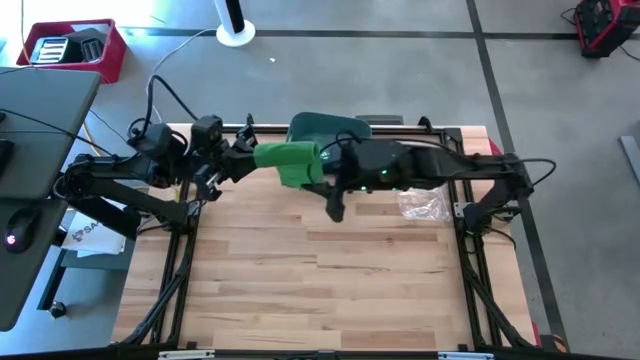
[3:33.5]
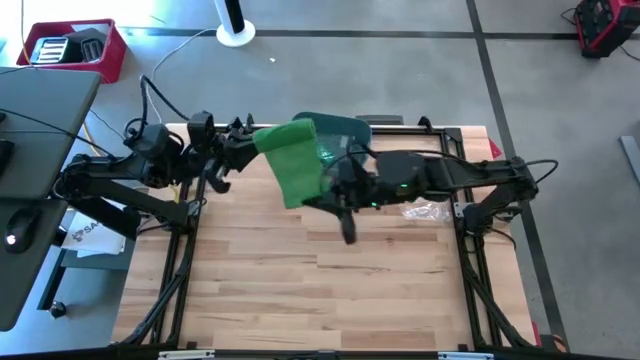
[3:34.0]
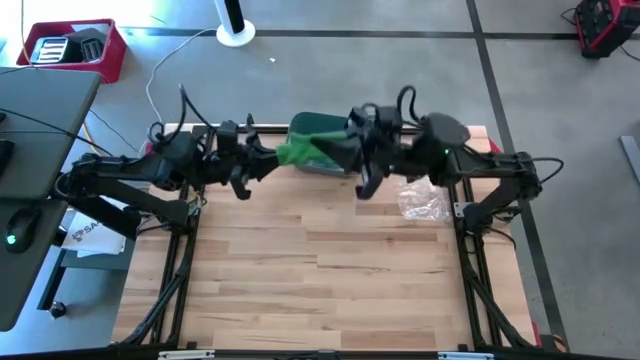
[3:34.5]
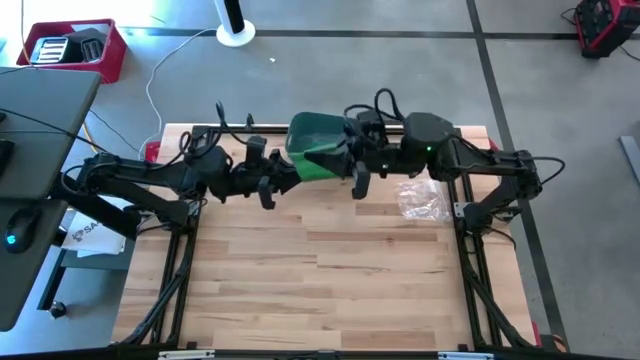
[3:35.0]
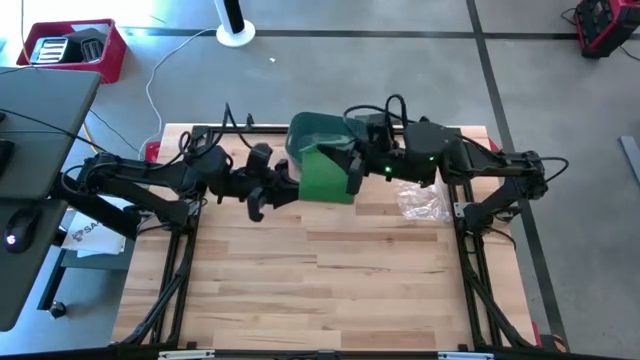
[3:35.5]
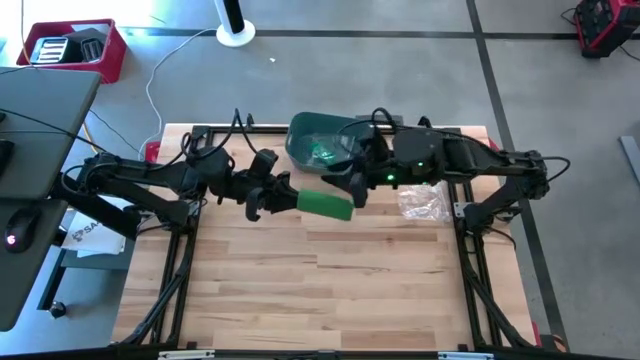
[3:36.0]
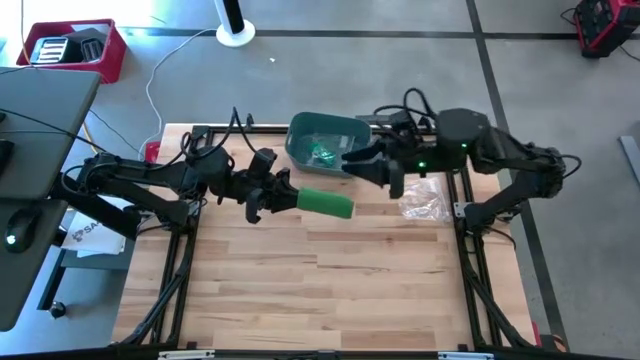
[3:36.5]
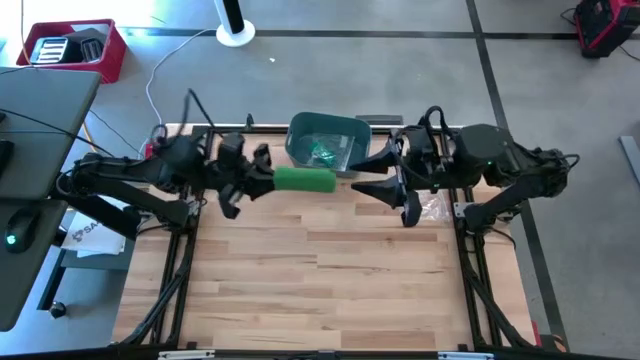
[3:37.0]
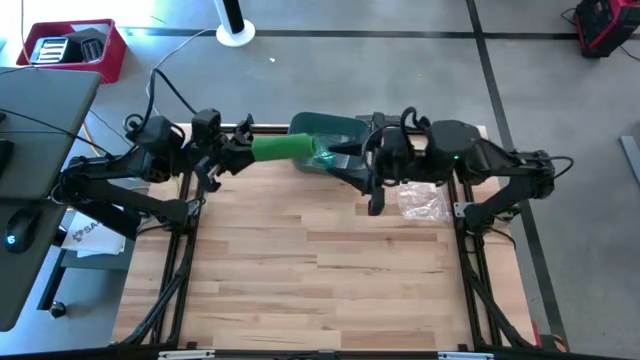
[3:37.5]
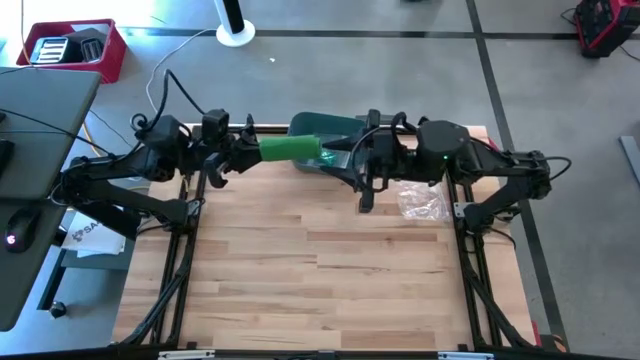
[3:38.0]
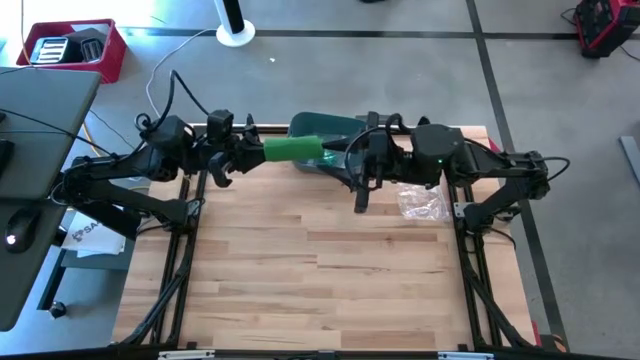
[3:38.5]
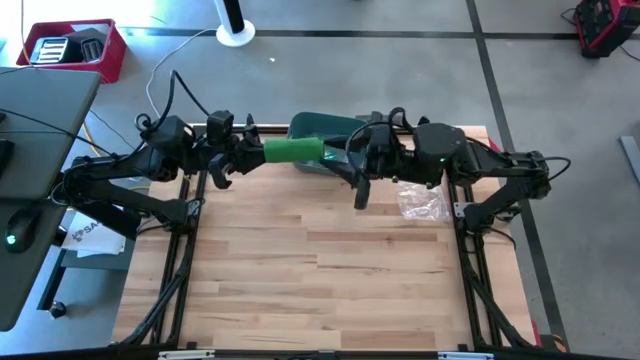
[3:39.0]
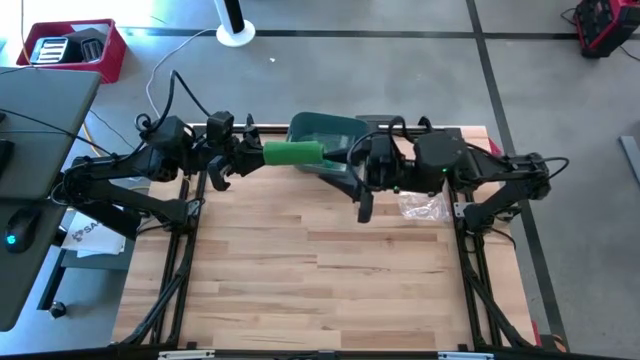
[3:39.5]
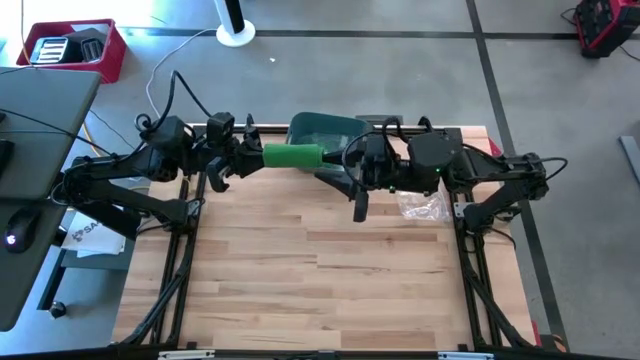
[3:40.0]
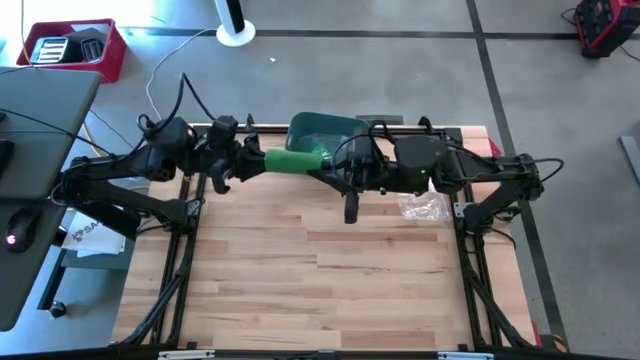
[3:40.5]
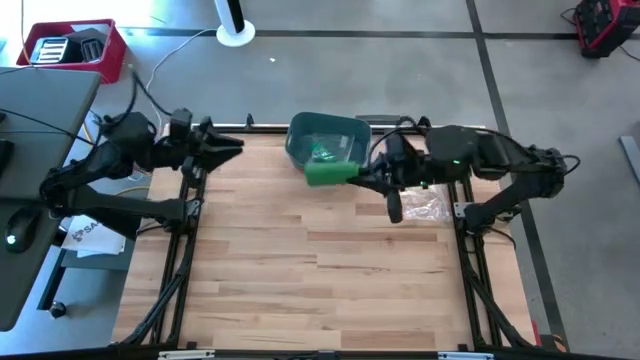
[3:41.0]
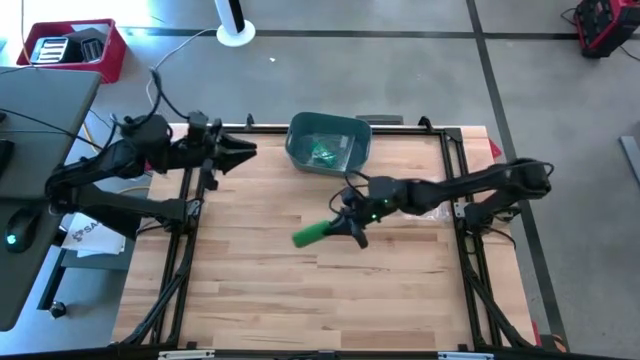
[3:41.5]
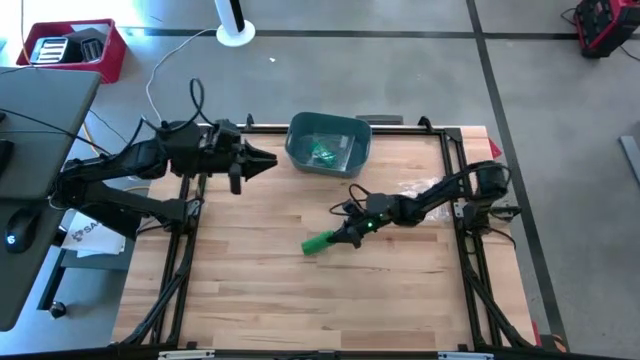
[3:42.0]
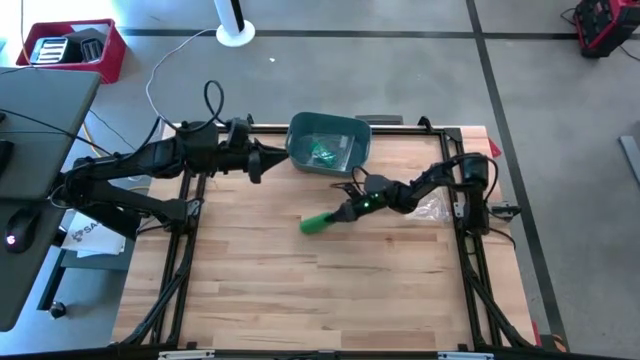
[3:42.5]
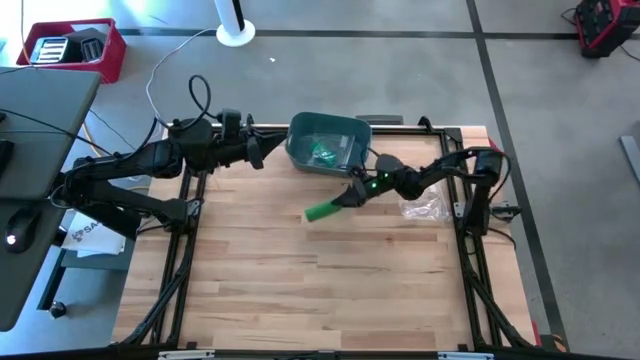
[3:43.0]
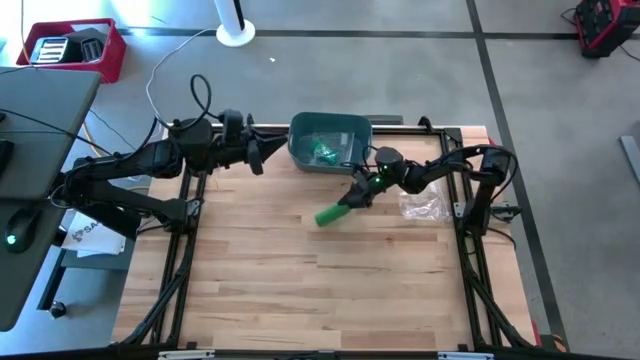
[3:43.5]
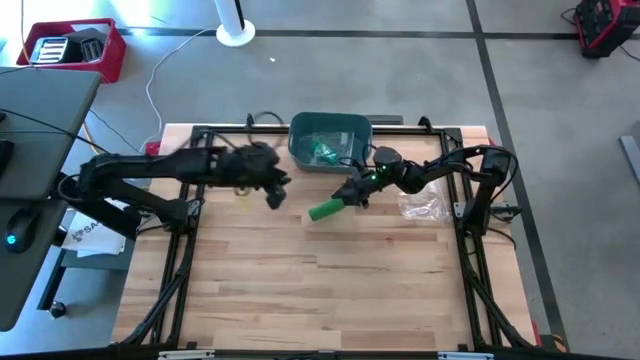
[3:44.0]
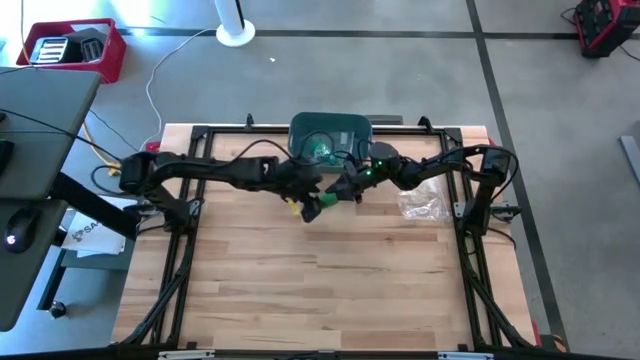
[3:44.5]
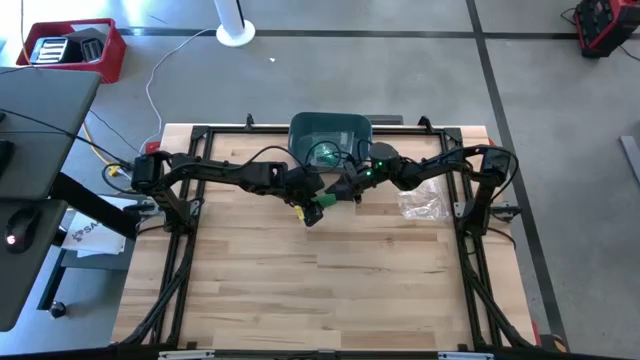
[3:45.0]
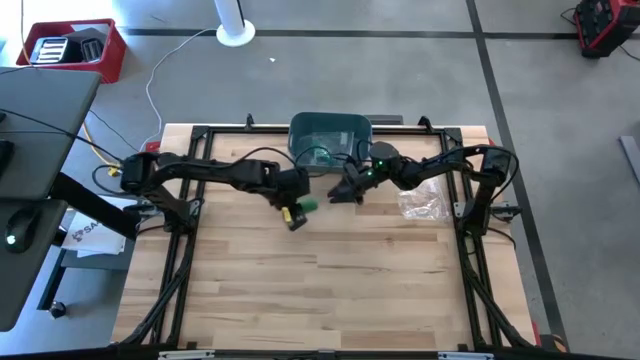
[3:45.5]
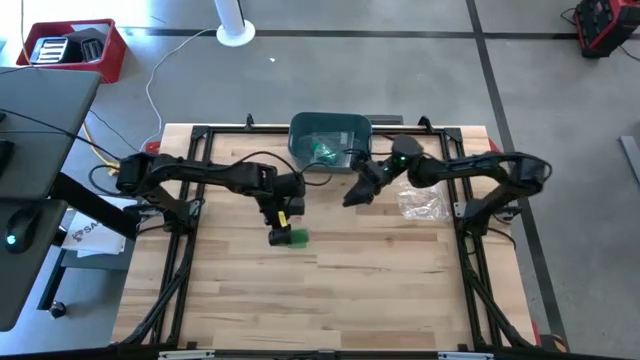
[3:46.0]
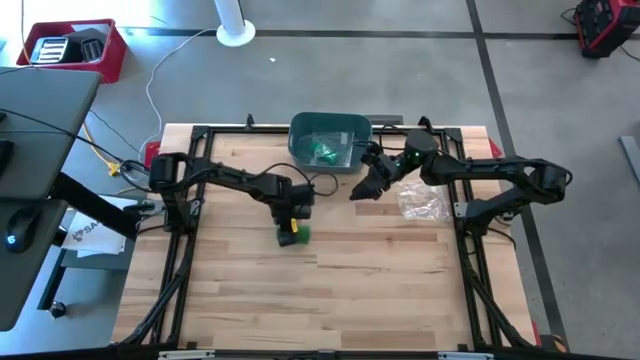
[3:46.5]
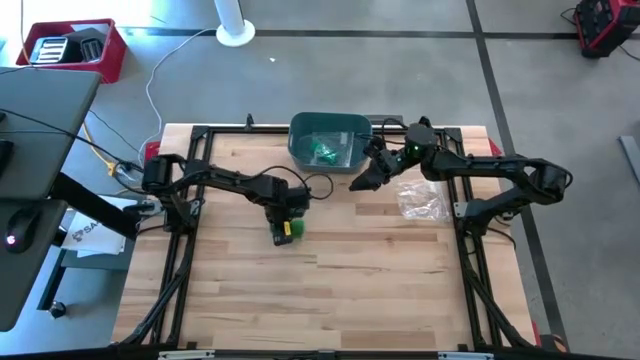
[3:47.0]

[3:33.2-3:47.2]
Task: Roll bandage
Roll the green bandage

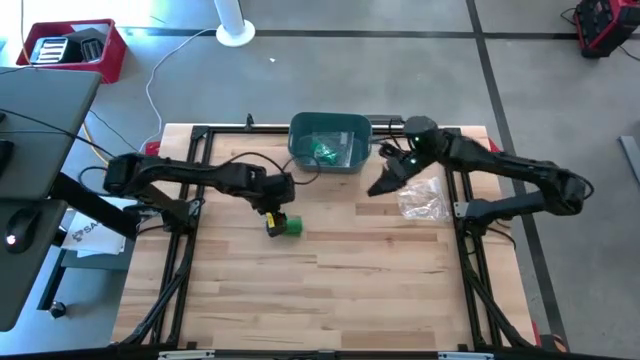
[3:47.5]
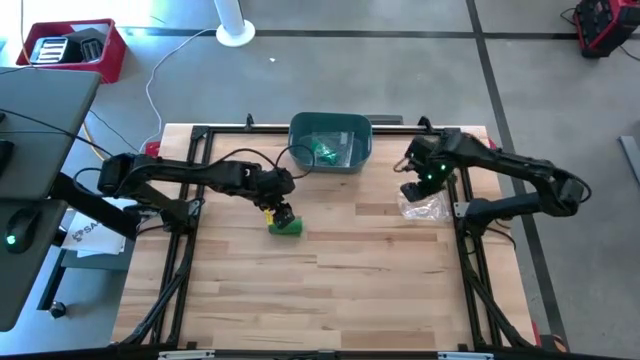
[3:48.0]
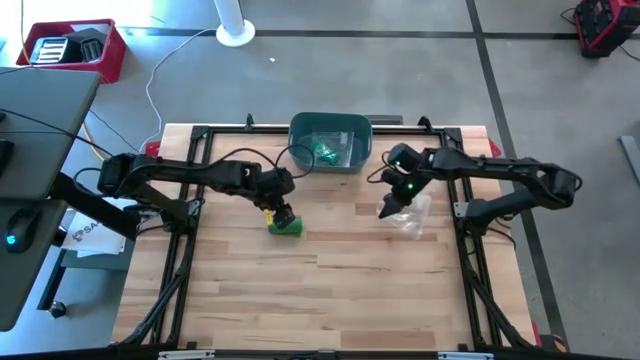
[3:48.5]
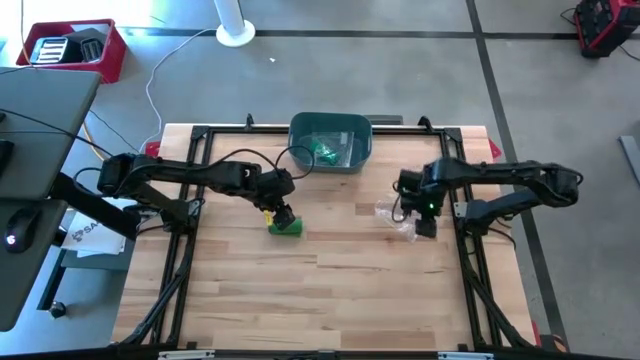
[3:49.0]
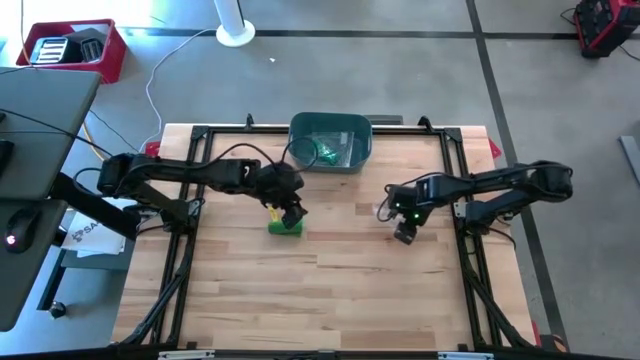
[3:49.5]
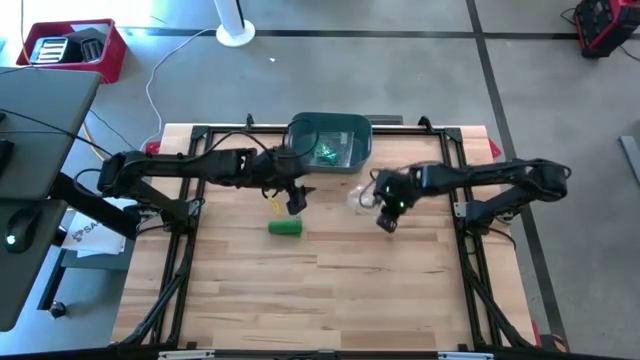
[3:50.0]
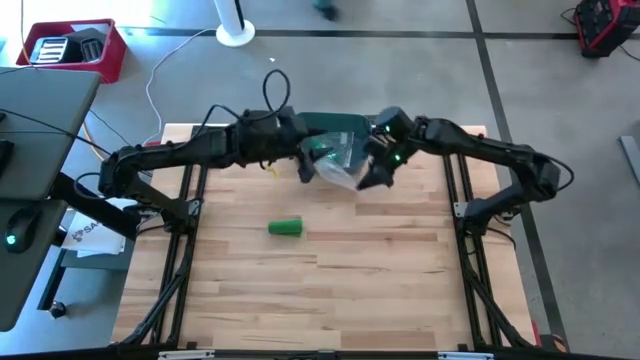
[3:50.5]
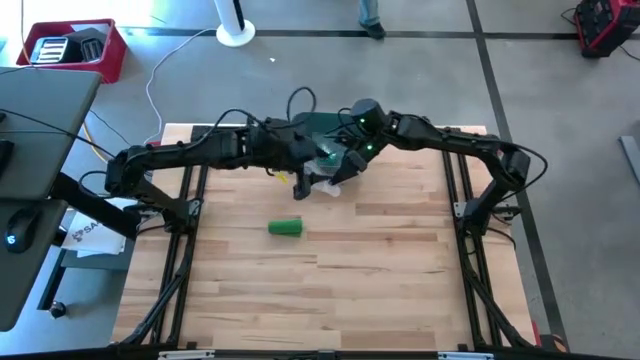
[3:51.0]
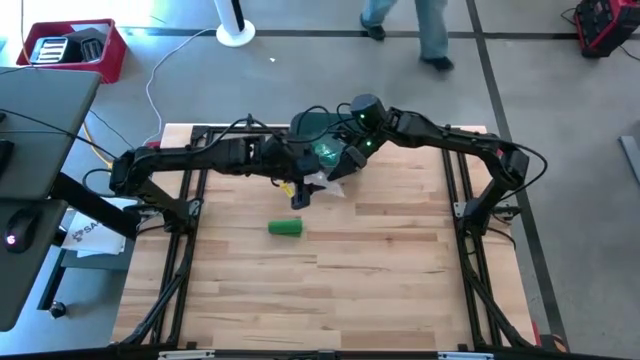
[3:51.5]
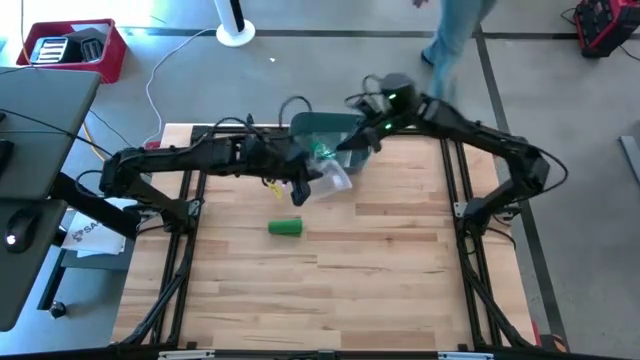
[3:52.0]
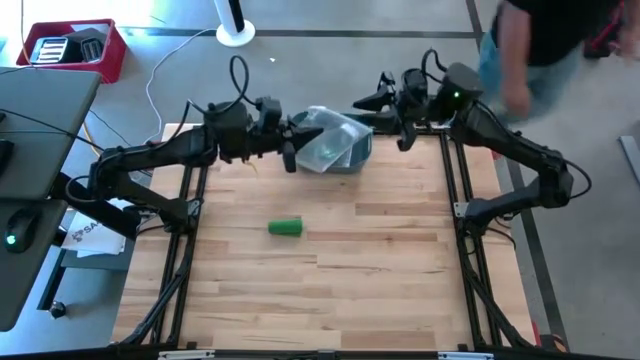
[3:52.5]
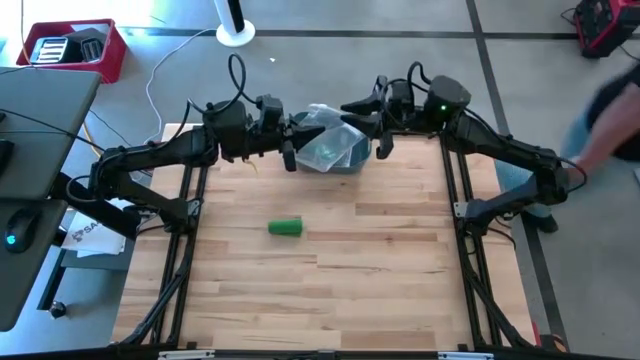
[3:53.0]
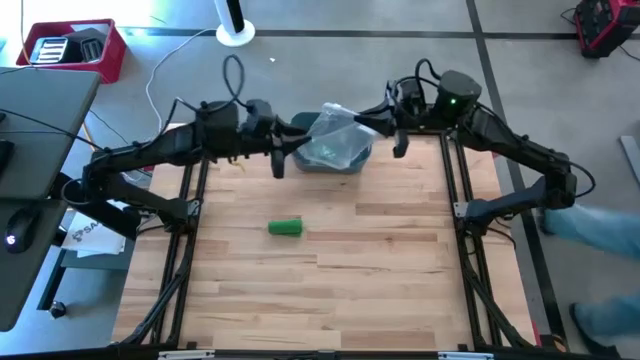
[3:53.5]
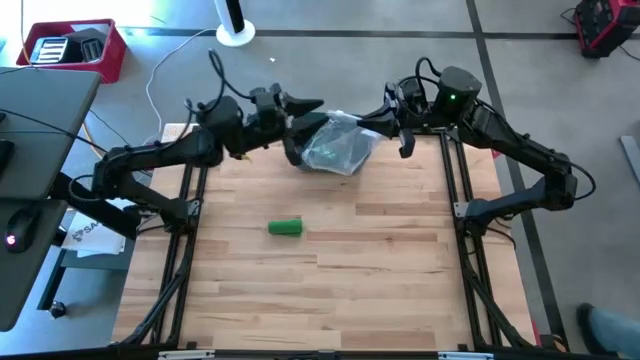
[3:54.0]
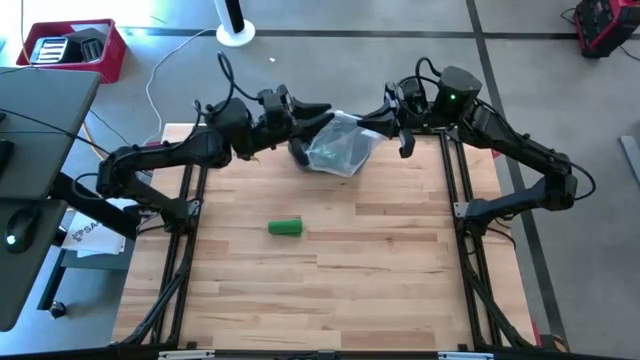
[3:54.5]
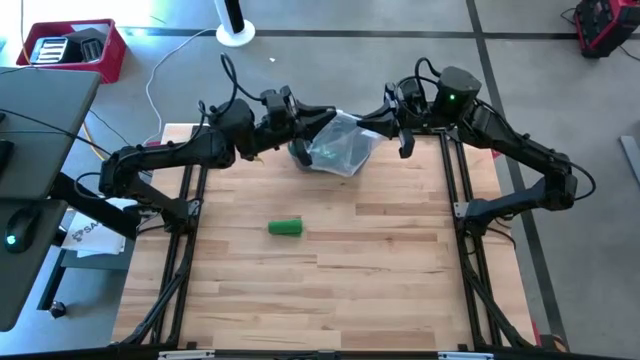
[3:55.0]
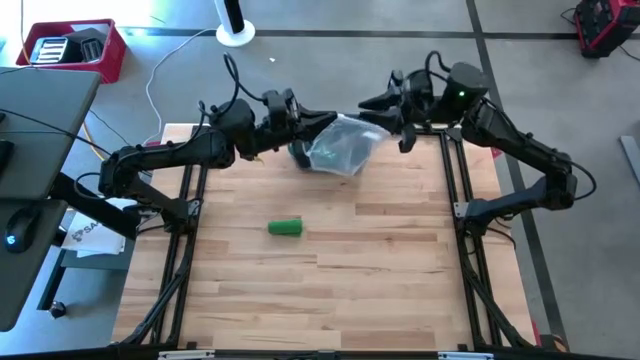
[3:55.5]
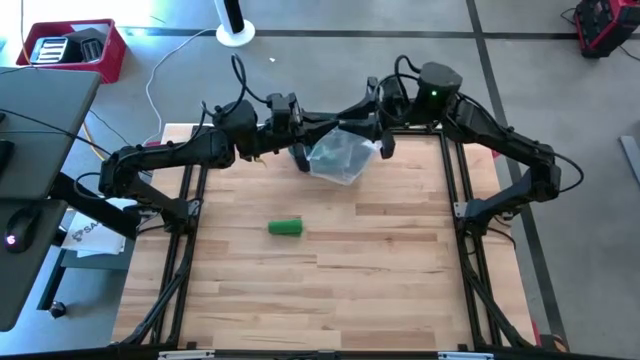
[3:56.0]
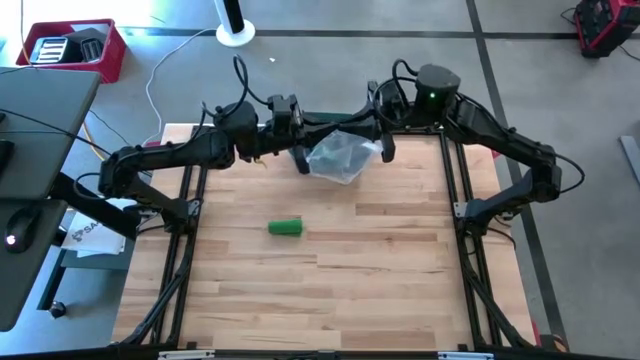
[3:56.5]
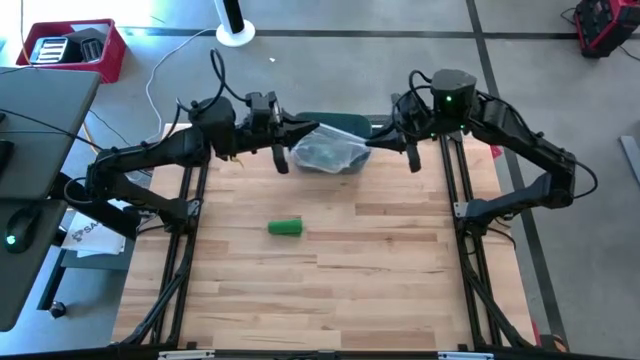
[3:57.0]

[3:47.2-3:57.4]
Open the transparent zip bag
